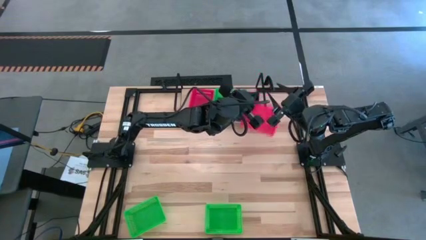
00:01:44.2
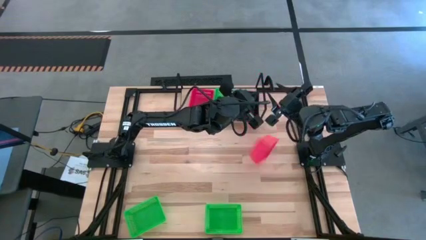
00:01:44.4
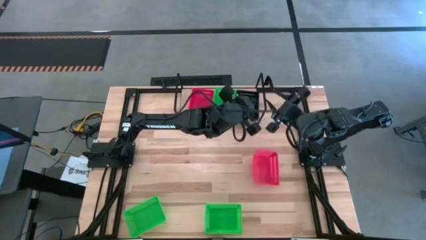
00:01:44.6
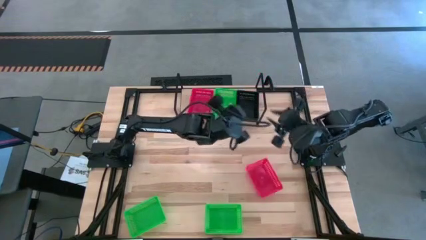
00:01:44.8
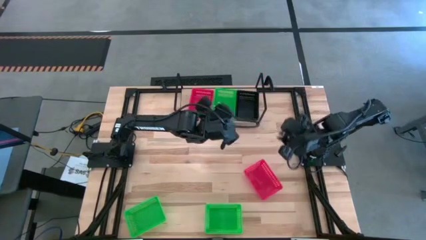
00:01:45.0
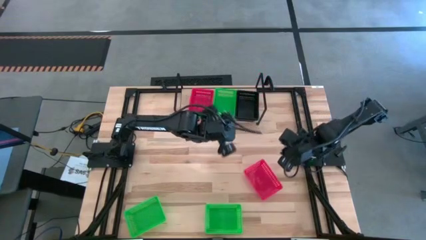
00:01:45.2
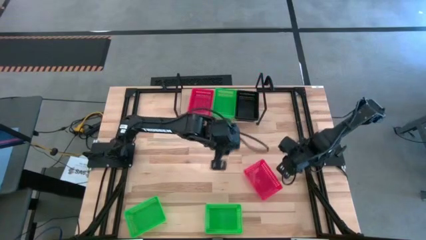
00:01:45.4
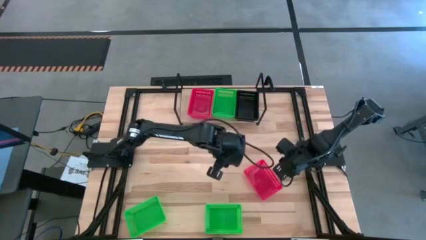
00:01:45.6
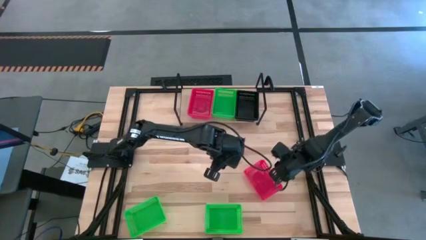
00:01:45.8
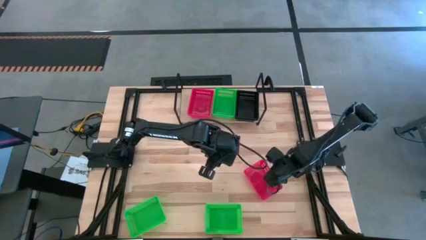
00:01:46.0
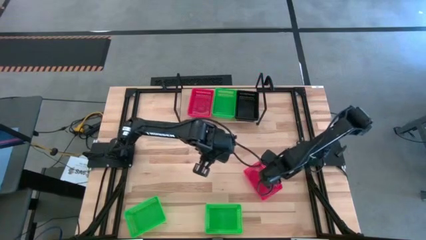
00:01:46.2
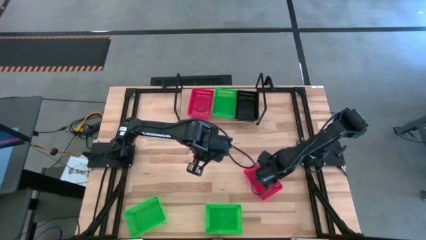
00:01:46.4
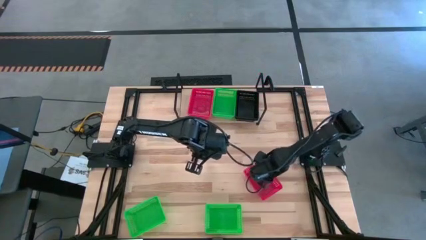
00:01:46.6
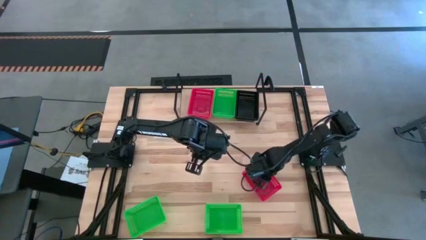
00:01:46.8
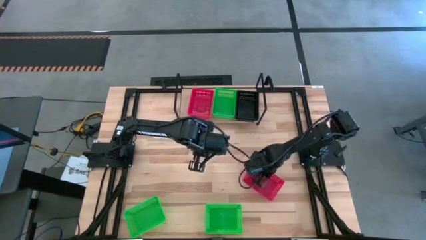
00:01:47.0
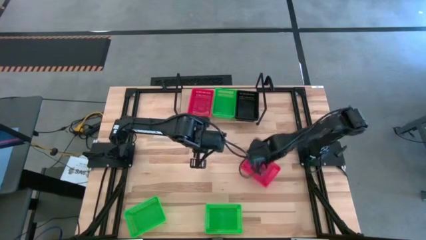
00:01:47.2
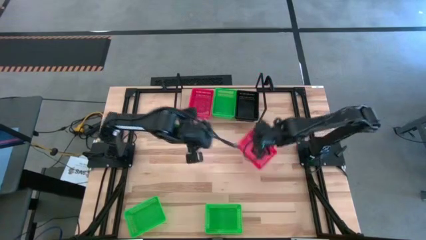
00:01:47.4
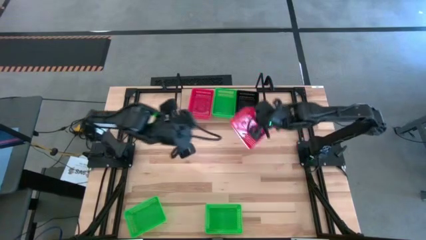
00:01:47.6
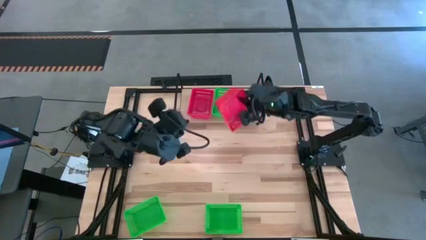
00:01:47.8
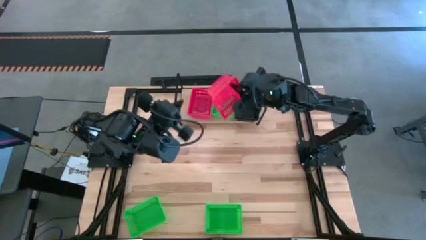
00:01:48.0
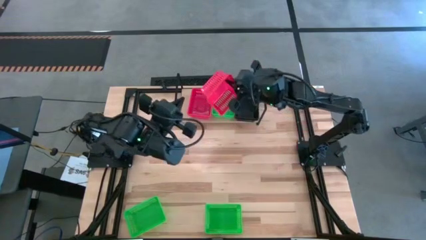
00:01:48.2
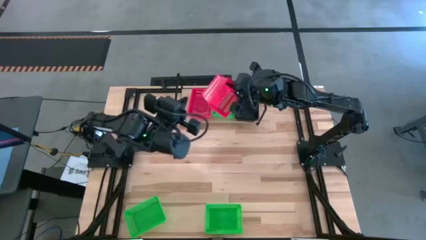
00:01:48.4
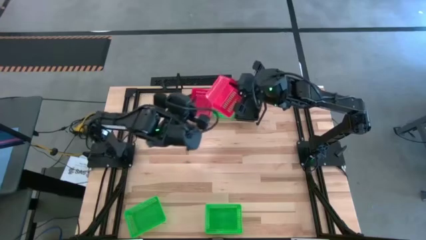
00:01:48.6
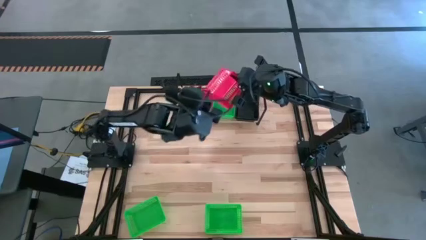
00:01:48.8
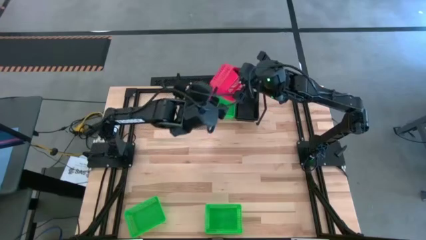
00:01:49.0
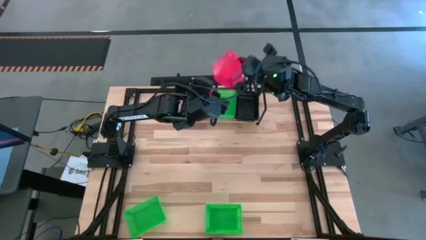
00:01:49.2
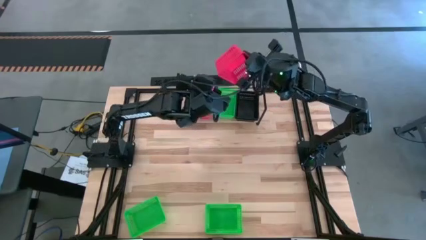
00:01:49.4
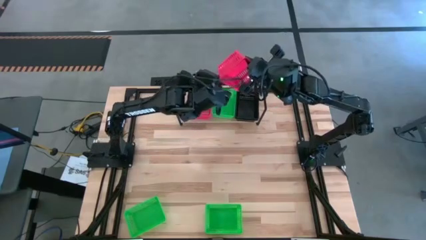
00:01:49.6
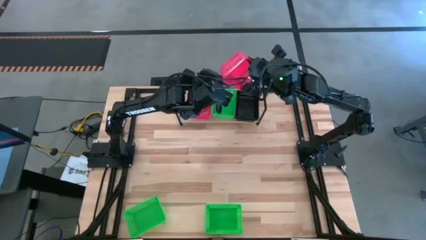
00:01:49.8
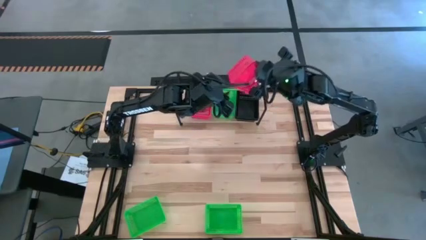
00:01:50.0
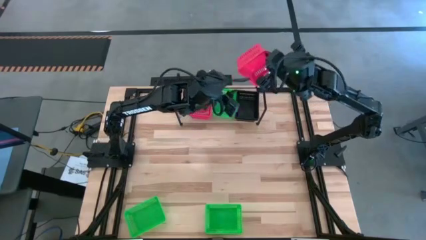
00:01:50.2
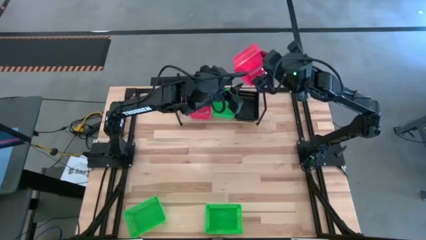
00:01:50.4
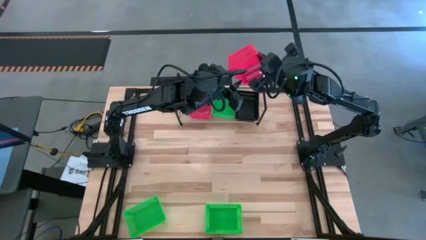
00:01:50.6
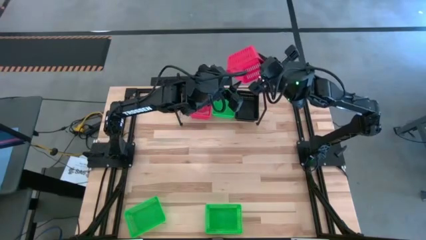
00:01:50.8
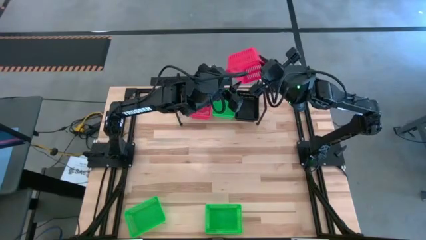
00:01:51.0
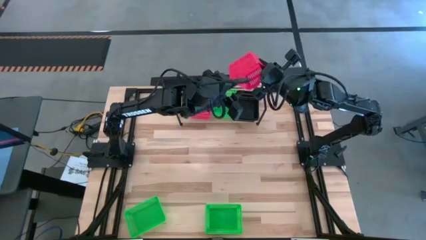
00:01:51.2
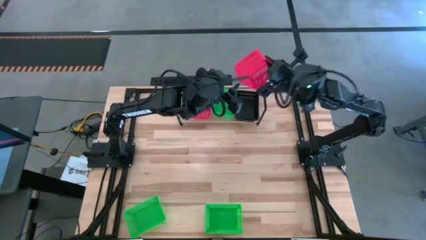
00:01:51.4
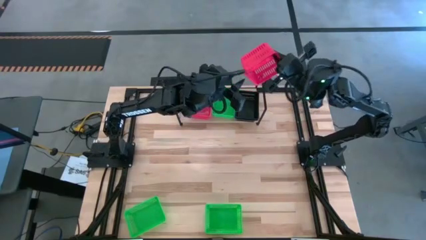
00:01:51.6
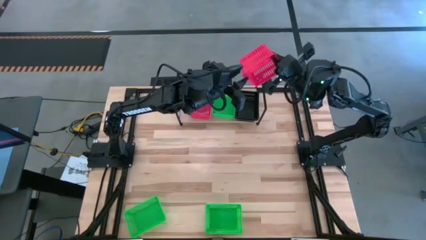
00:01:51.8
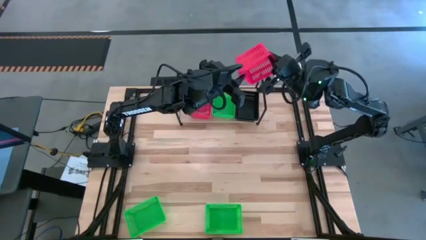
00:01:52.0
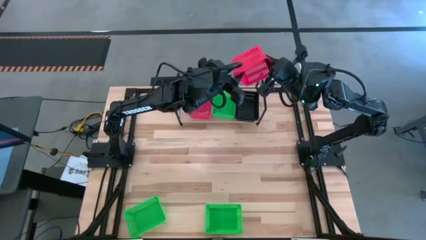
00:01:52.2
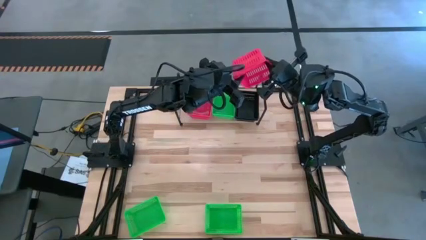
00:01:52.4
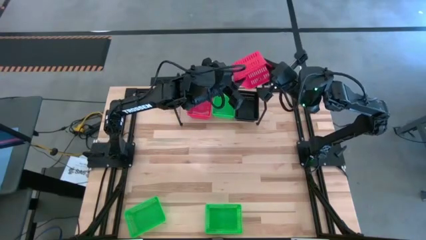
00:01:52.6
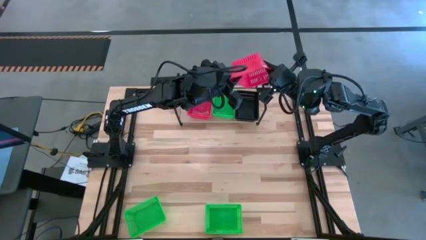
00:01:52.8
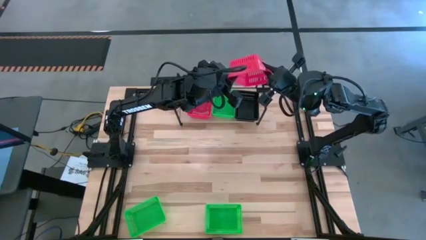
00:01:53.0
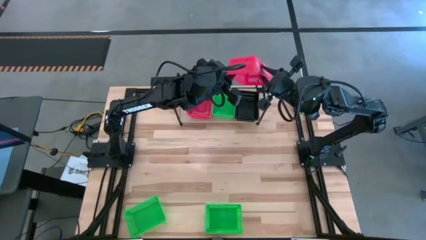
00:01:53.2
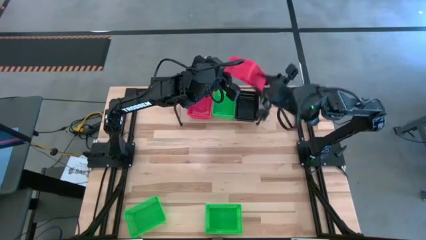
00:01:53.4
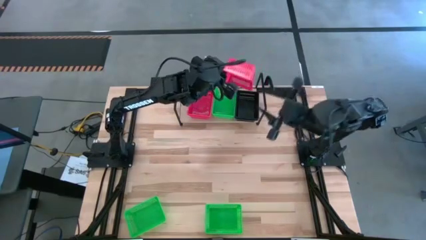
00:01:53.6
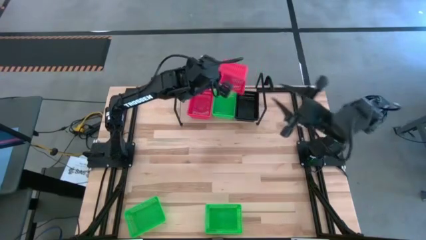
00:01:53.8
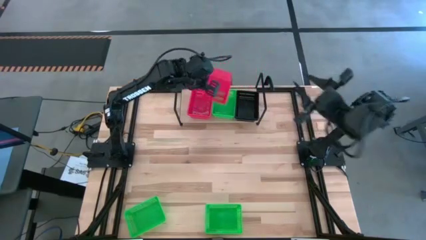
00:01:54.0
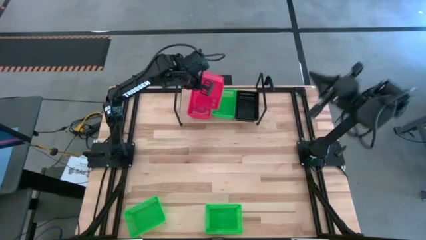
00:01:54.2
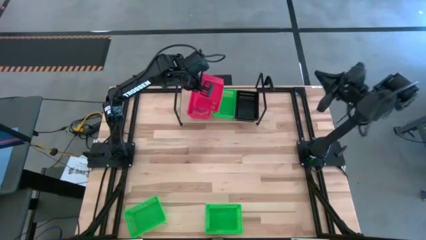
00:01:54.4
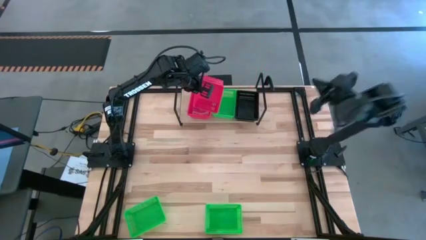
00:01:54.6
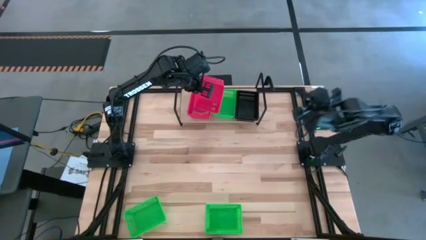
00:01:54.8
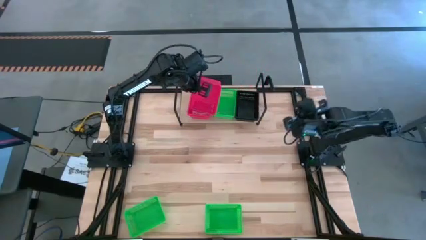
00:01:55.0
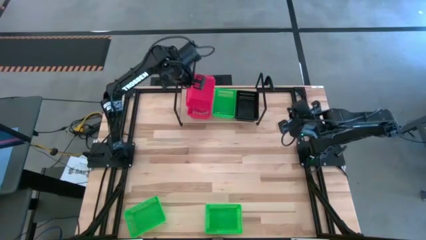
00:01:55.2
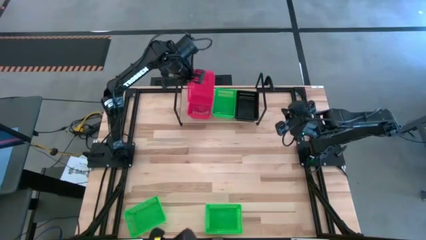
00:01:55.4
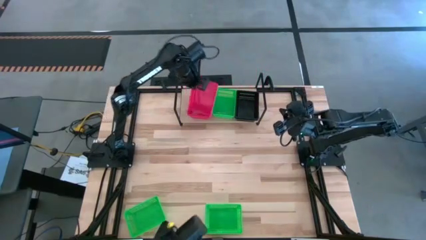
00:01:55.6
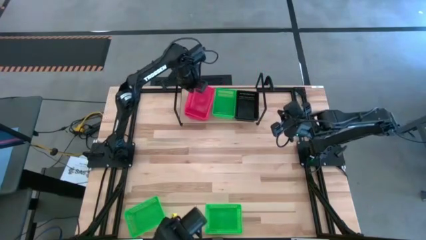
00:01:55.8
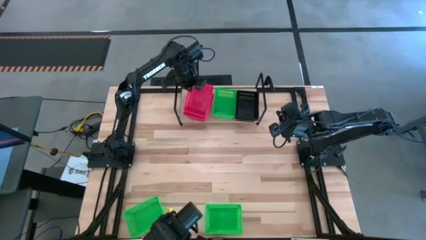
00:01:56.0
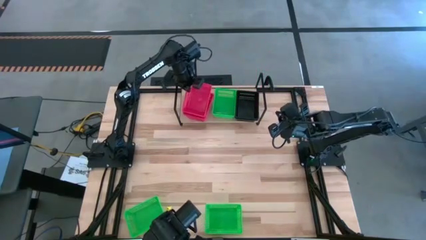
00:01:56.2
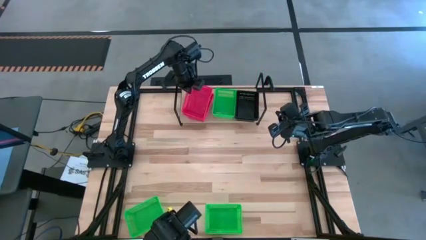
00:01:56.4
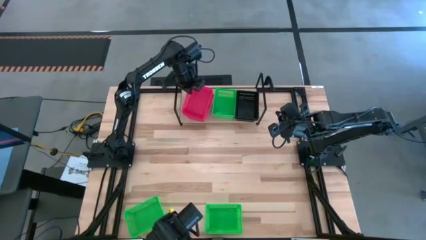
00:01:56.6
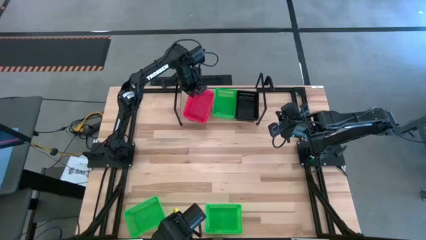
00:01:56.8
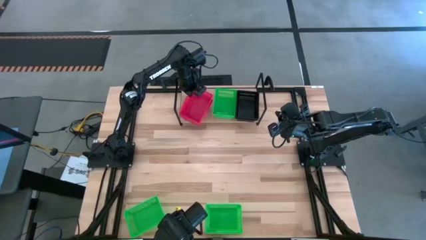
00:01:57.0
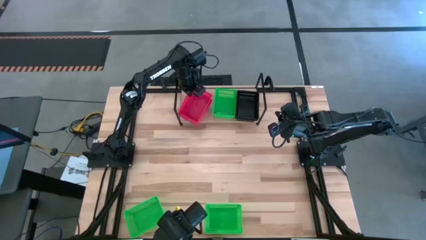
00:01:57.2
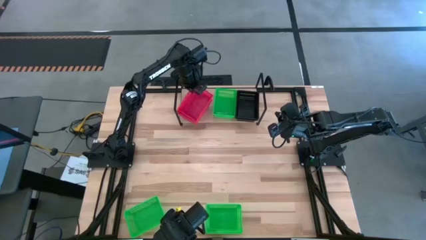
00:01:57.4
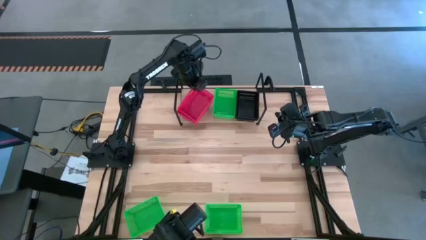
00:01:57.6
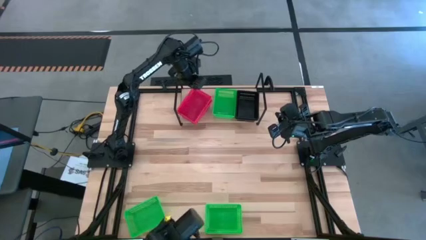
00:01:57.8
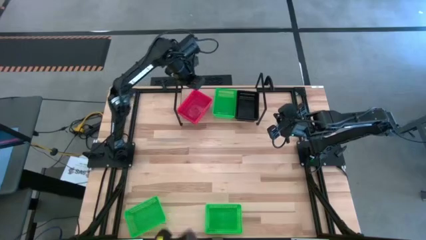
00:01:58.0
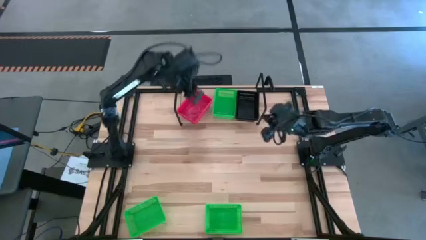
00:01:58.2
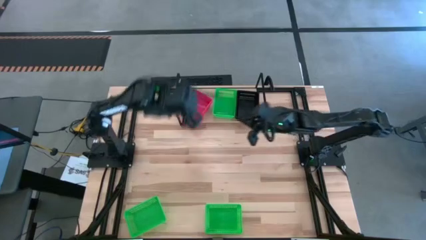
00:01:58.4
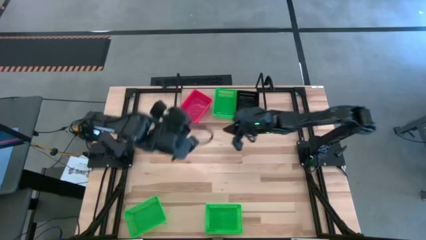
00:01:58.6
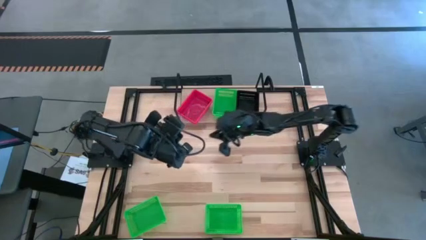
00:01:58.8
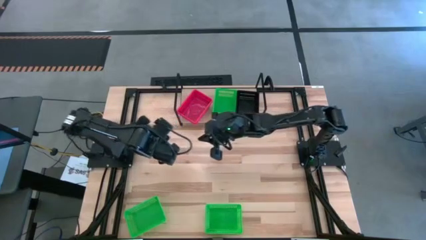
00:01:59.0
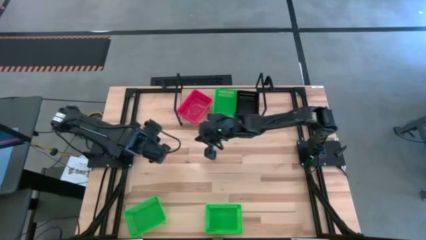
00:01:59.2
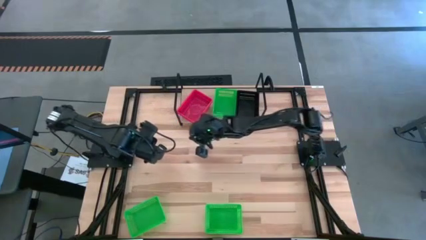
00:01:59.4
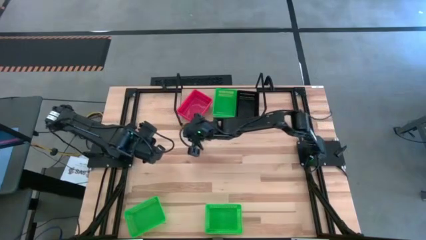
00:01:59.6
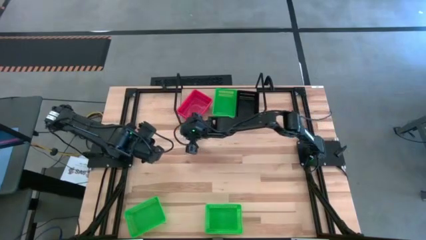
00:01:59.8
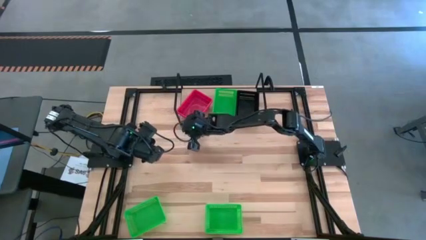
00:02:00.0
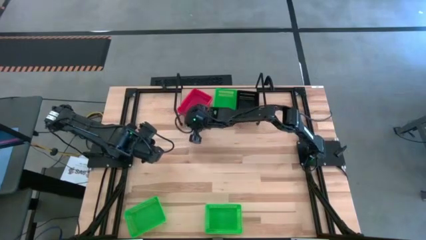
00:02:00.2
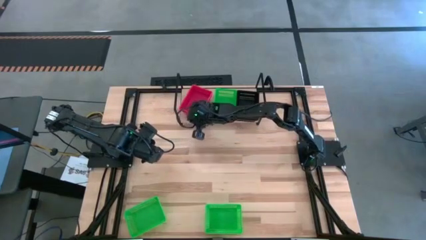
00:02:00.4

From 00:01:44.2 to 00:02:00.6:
Task: Stack baskets on shelf by color
Stack the red bin on top of the other red bins on the shelf
